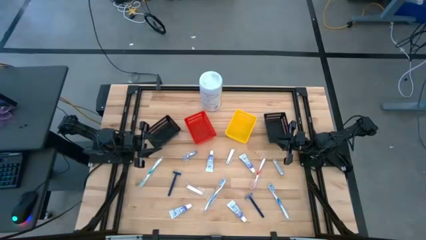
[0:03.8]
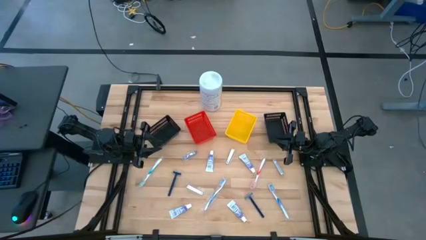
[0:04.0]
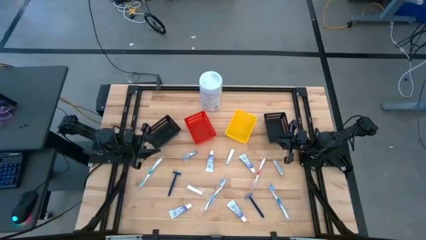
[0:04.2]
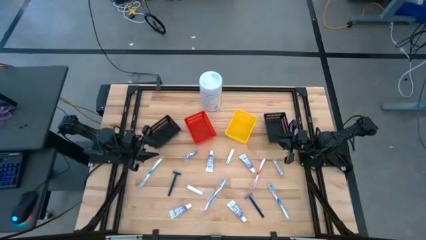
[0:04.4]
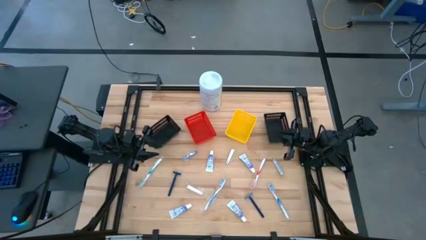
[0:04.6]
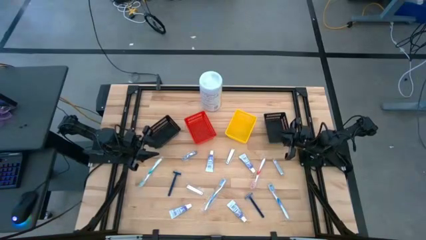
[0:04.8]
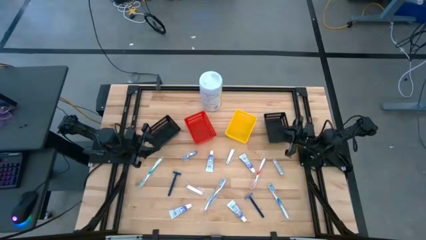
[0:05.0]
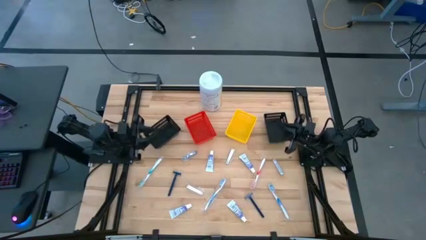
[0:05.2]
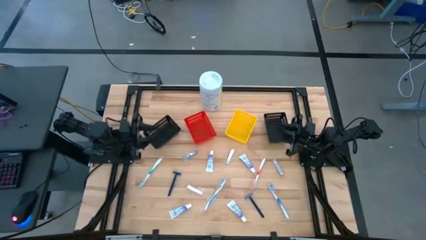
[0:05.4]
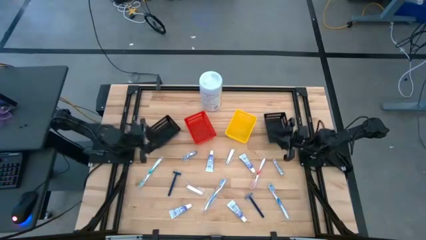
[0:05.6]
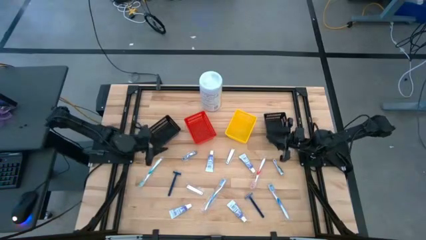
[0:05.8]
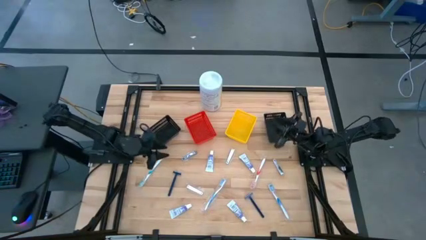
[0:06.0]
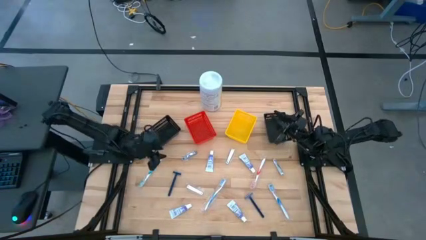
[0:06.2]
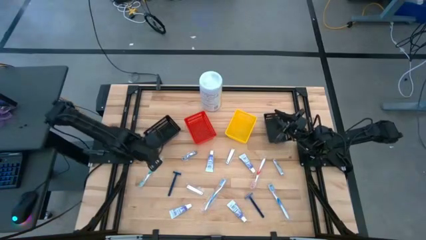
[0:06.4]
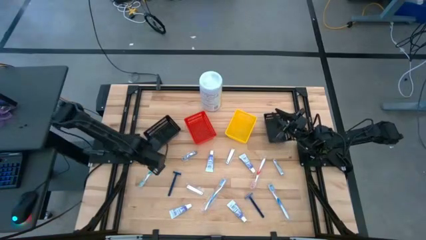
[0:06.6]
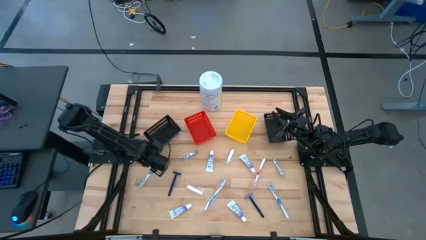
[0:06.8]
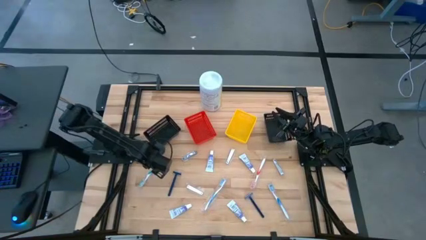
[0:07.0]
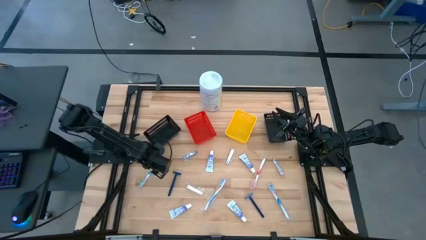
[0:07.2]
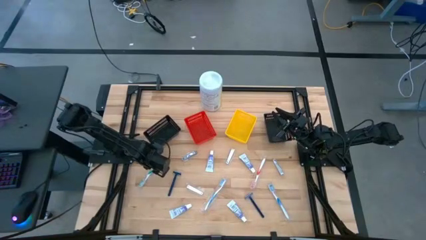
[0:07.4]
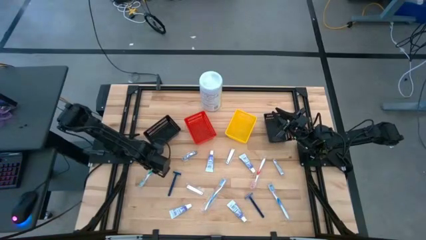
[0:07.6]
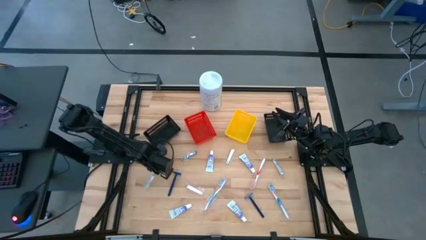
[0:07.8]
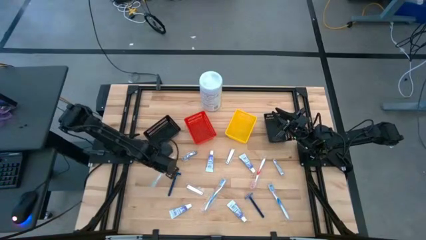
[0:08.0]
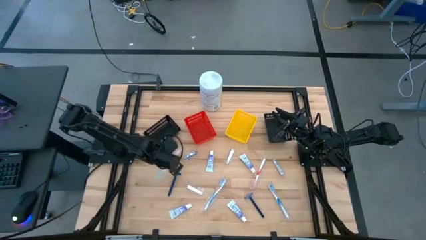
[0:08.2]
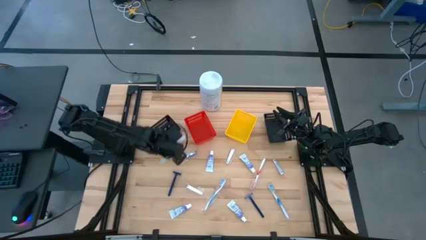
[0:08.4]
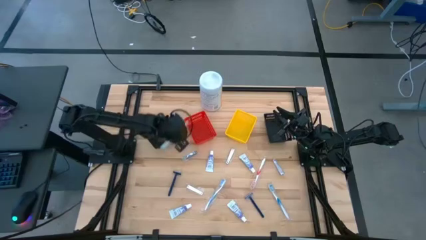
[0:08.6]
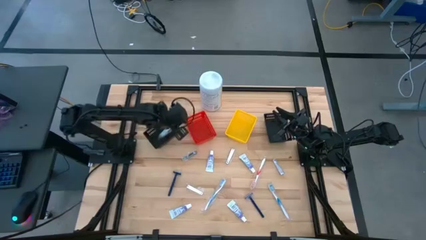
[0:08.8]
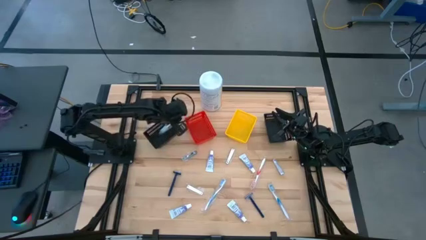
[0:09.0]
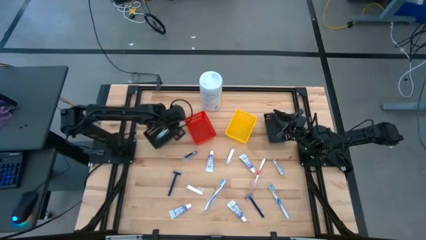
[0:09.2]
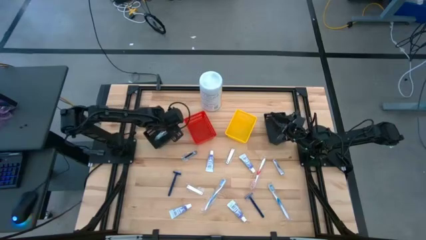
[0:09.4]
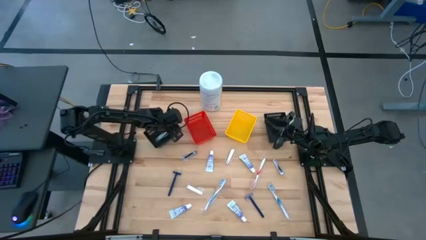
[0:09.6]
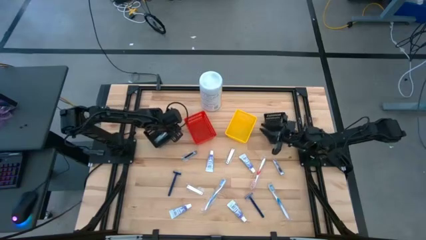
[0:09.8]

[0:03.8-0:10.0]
Task: Pick & Place Travel size toiletries
Put the green toothbrush into the left black basket

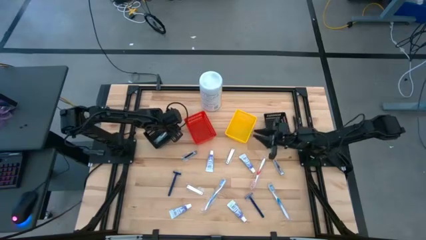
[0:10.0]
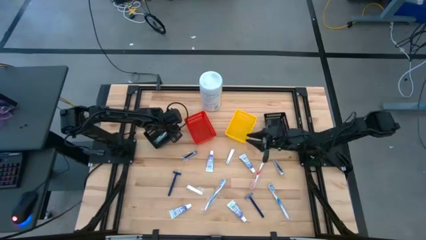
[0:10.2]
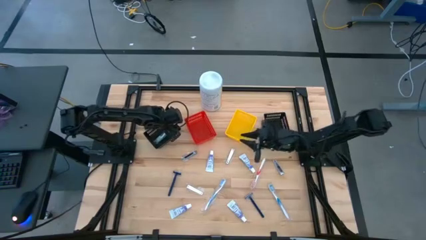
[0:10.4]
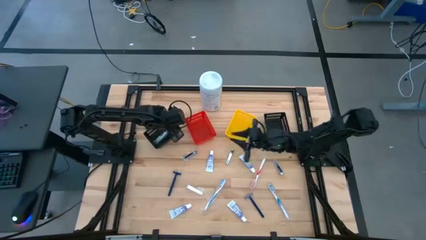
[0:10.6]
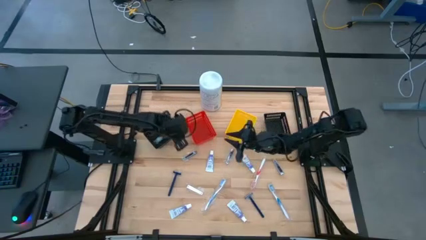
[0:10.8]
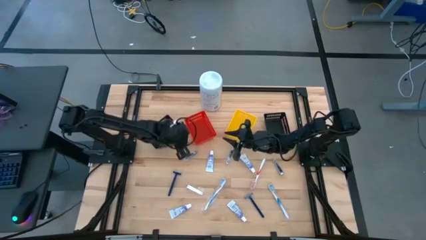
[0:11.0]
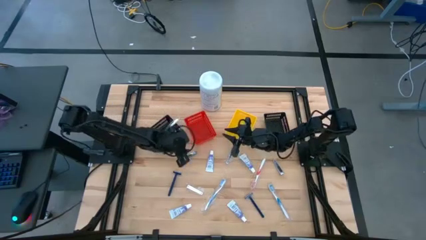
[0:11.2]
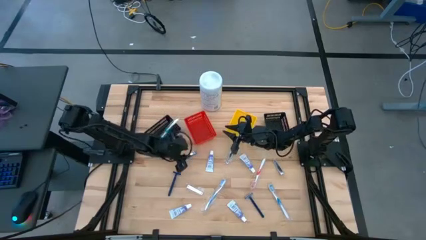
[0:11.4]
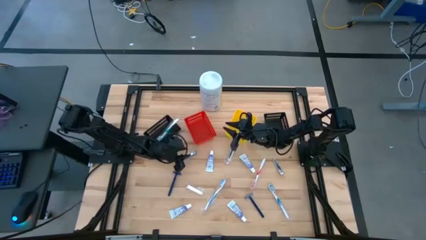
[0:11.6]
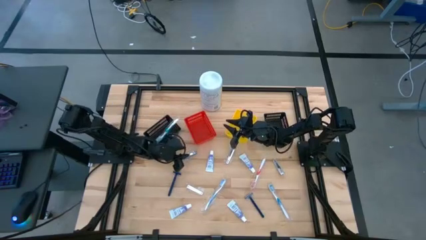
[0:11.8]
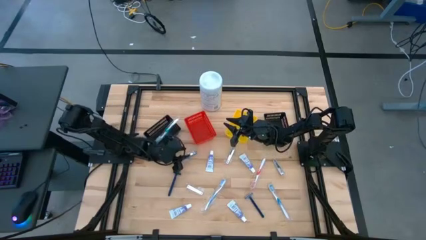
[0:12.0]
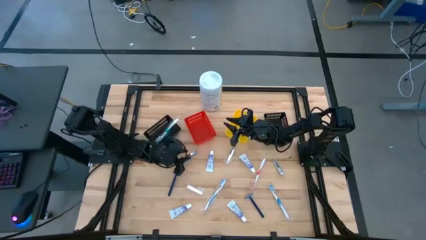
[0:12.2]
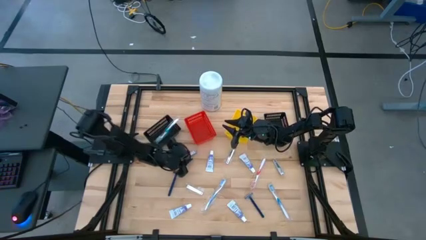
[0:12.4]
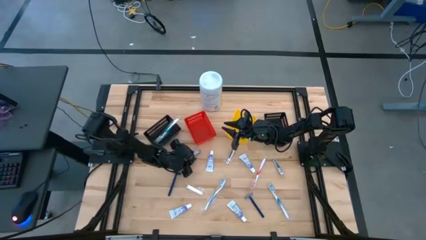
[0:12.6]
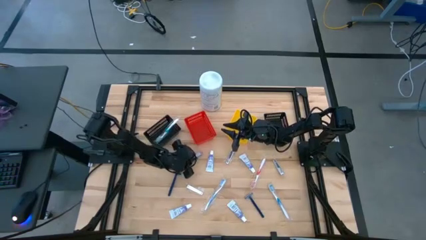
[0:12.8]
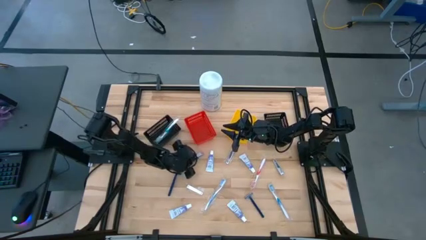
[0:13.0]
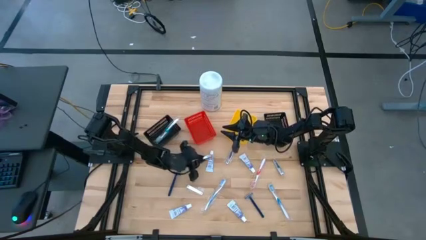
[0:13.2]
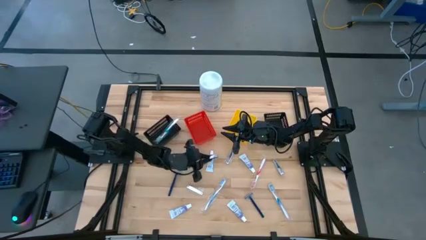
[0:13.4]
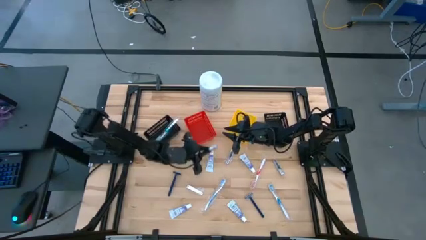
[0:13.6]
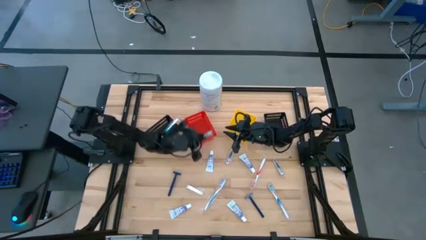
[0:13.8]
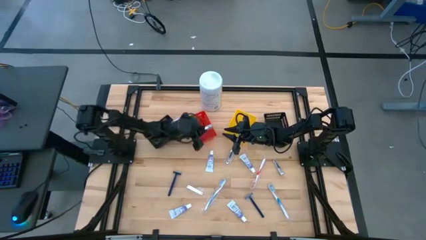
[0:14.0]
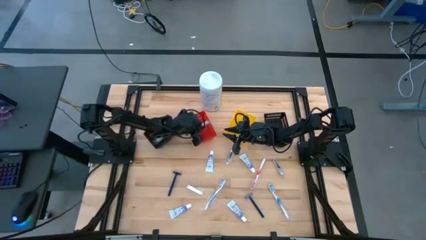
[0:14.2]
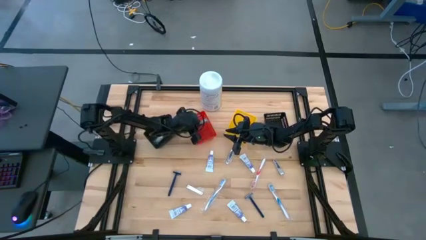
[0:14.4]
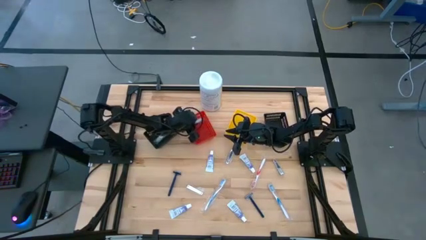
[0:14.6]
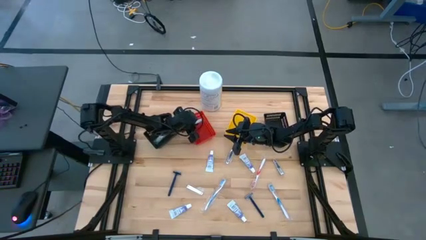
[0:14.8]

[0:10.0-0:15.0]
Put the top left silver nail clipper into the red basket

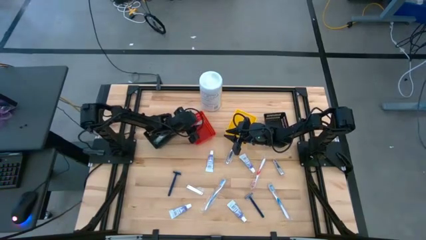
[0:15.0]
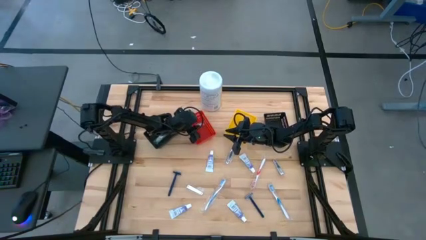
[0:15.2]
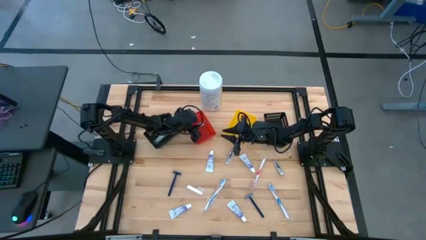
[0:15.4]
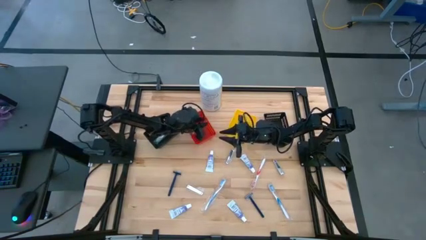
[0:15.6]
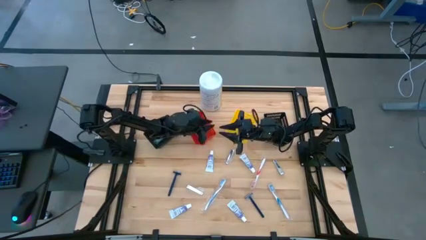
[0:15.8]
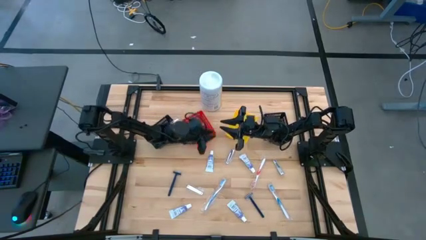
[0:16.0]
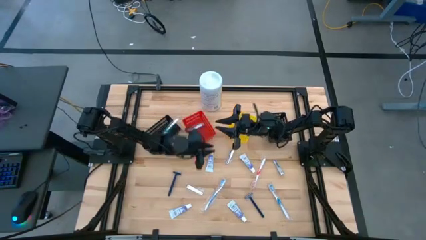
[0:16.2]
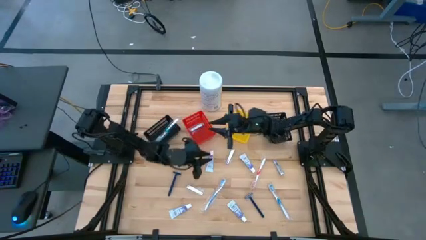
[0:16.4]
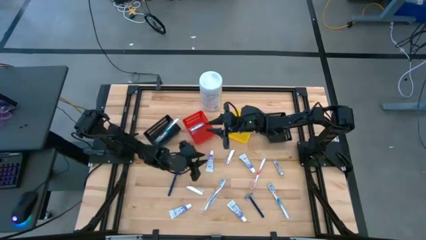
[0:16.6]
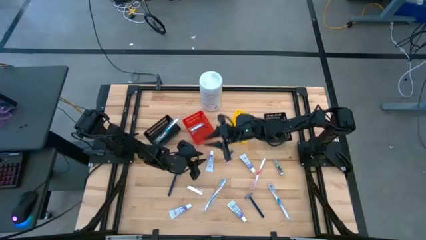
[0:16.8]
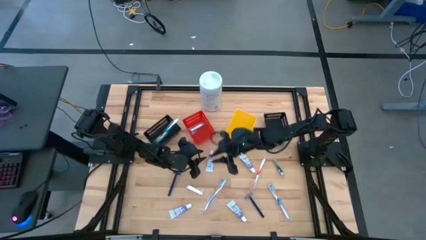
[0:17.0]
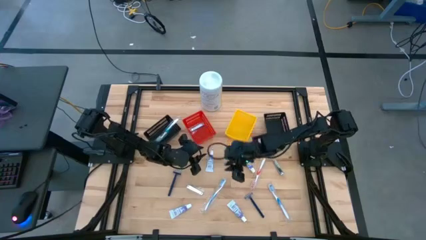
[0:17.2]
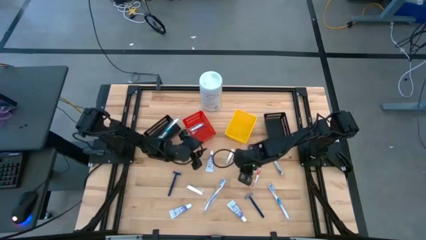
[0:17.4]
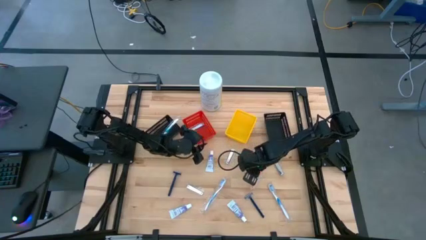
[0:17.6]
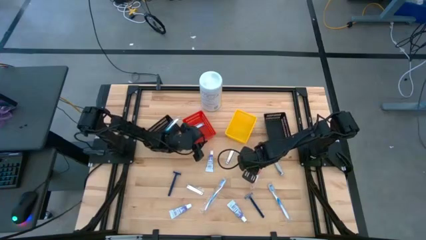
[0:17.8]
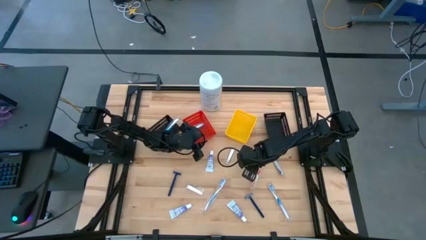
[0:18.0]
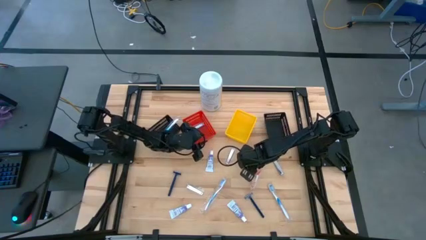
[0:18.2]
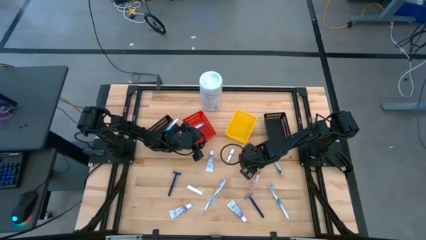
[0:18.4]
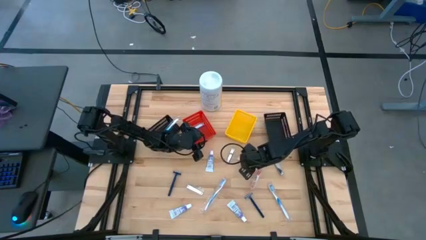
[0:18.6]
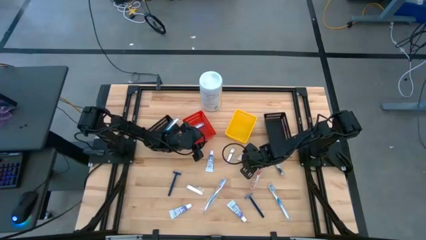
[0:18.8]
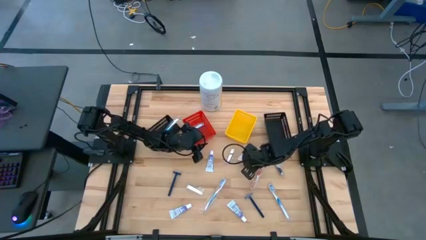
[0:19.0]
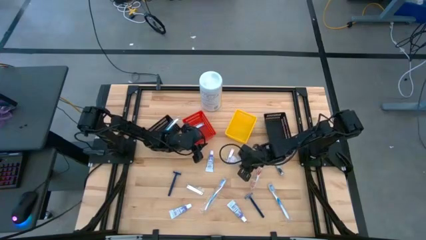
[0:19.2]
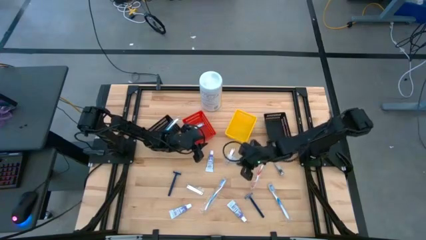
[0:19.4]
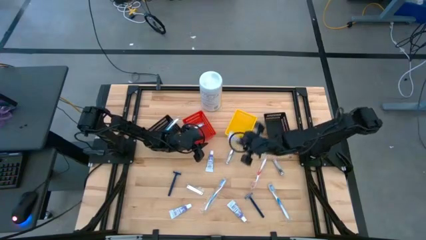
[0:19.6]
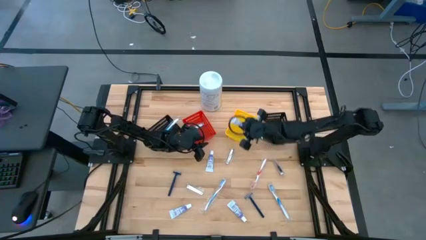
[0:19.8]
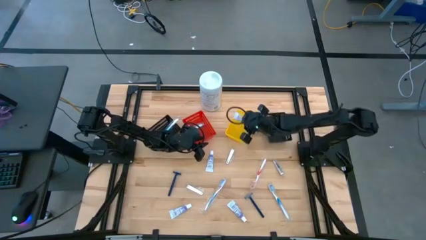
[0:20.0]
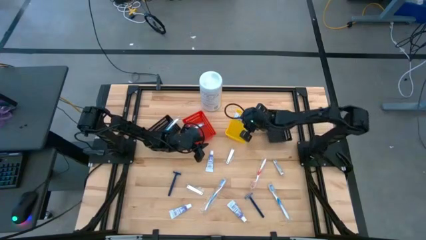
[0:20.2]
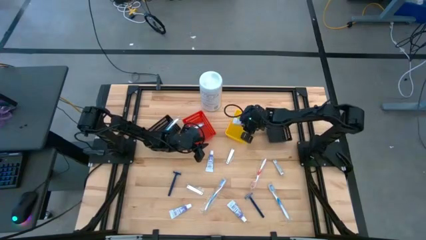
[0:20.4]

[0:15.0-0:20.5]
Put the top right white toothpaste into the yellow basket
